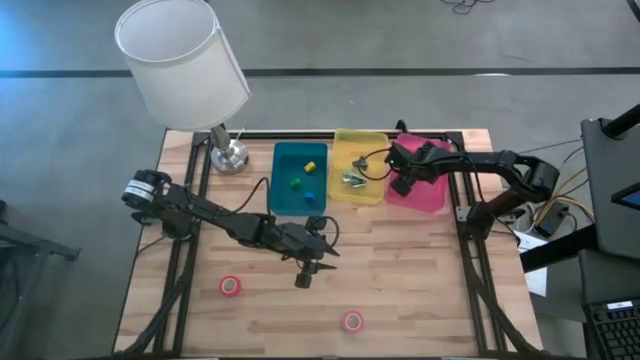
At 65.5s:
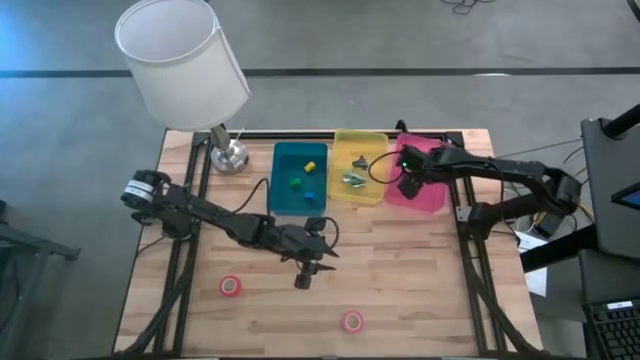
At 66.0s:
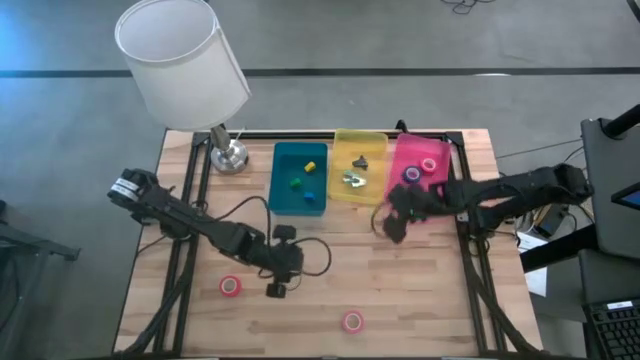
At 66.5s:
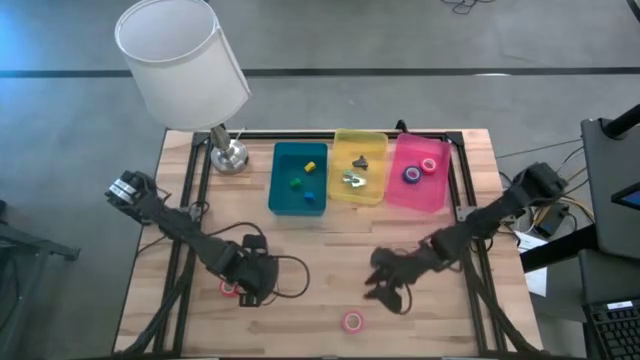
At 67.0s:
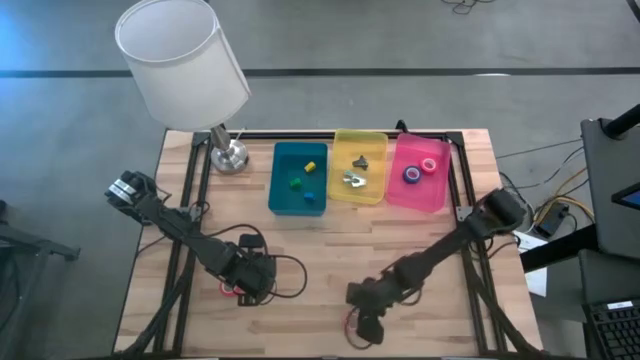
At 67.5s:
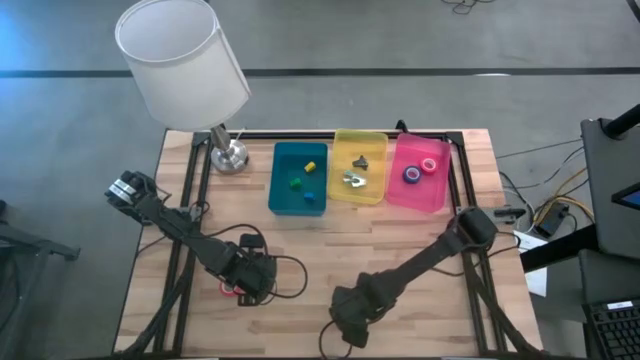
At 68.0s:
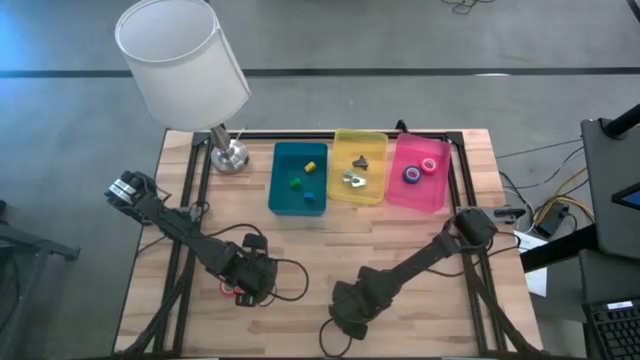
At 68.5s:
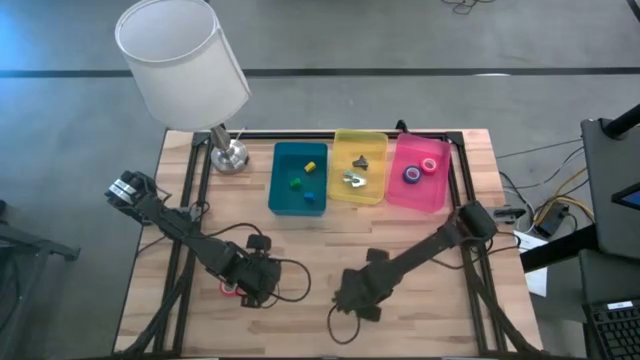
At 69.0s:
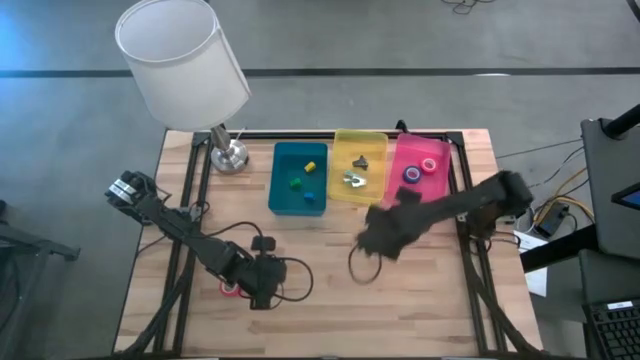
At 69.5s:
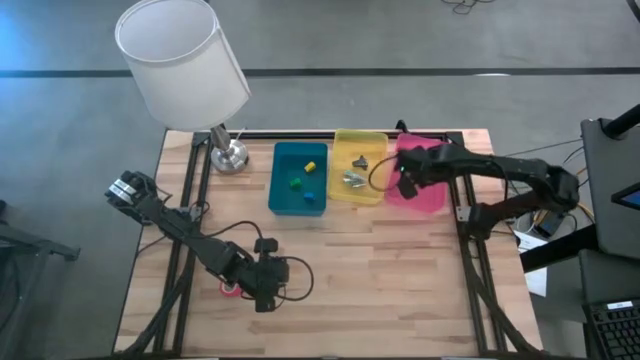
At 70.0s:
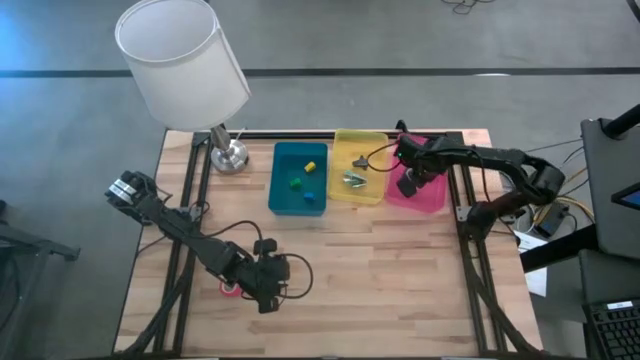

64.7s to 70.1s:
Task: Pick and place Stapler, Stapler remover, tape
Put the pink tape on the pink bin

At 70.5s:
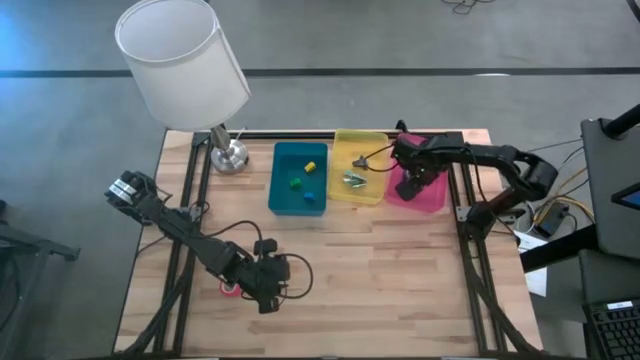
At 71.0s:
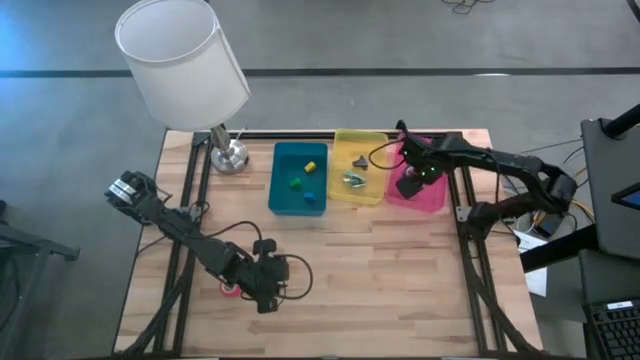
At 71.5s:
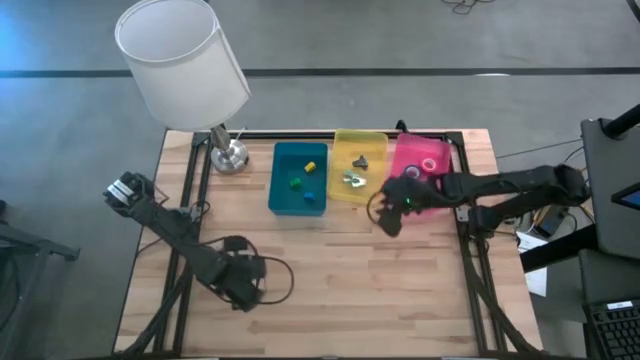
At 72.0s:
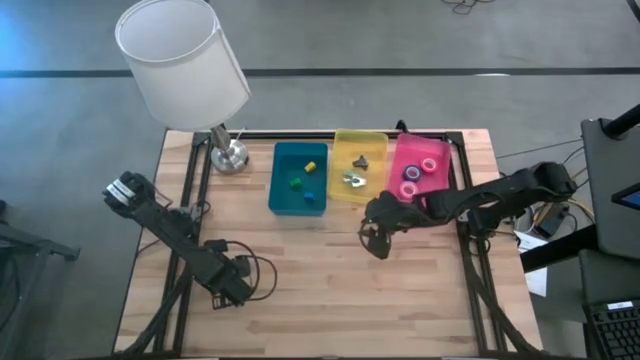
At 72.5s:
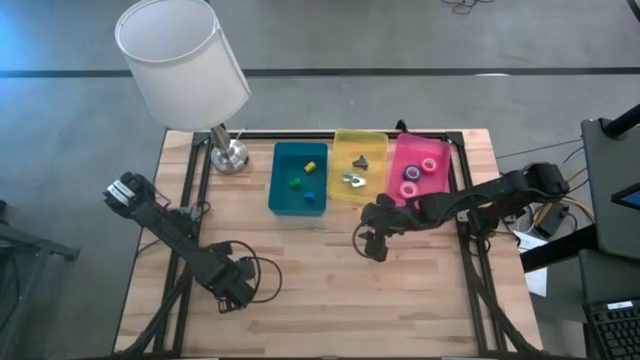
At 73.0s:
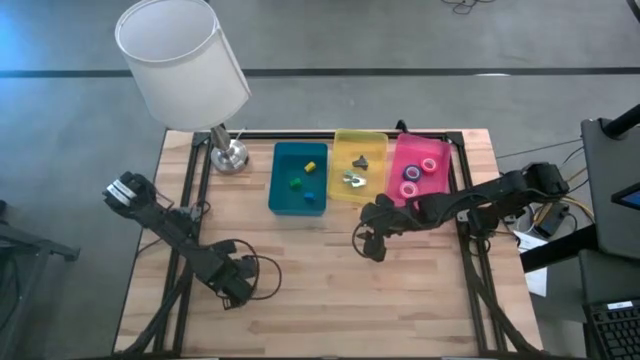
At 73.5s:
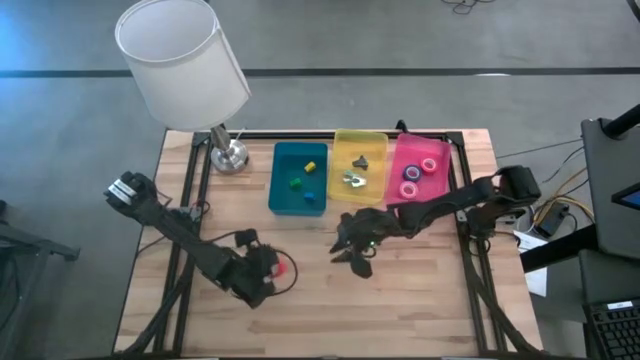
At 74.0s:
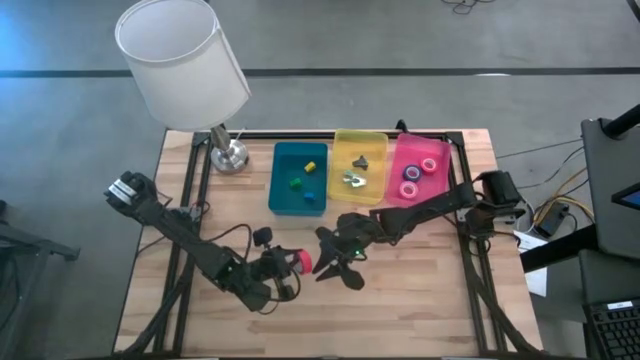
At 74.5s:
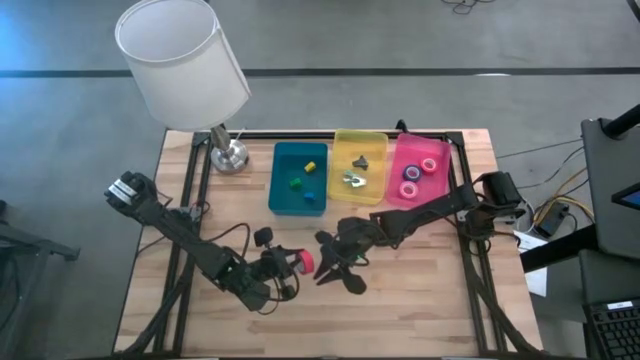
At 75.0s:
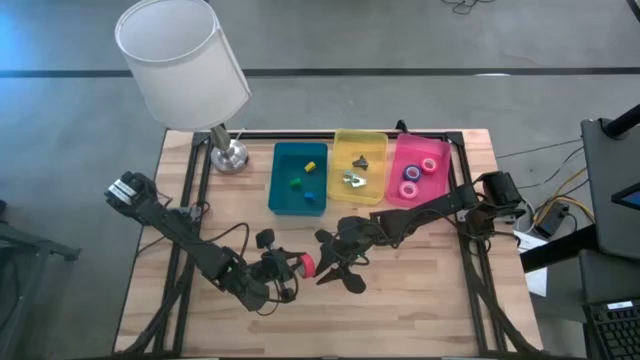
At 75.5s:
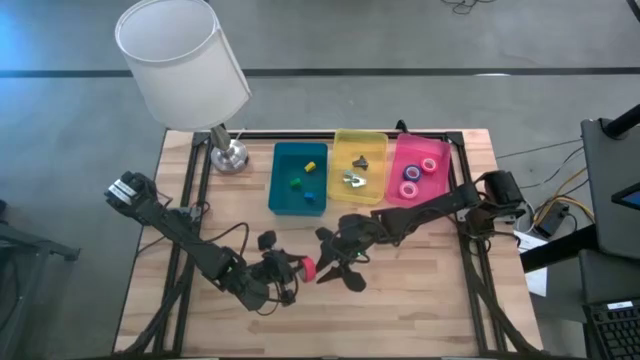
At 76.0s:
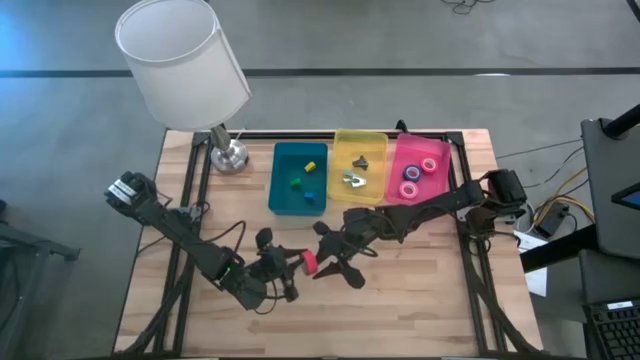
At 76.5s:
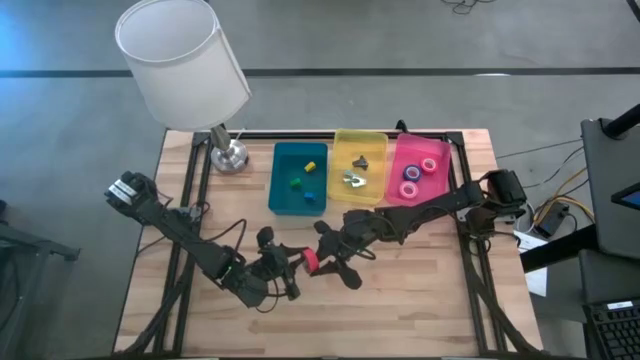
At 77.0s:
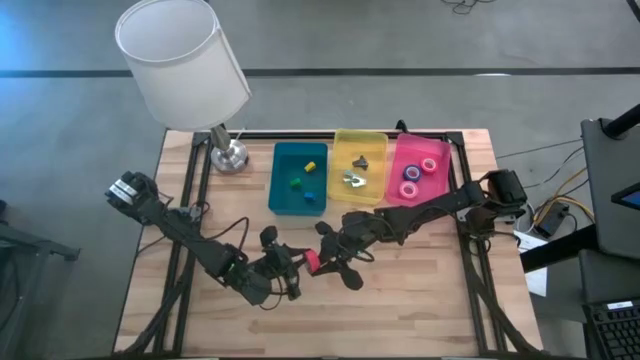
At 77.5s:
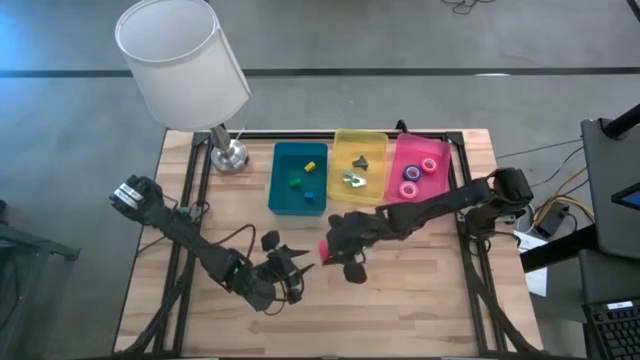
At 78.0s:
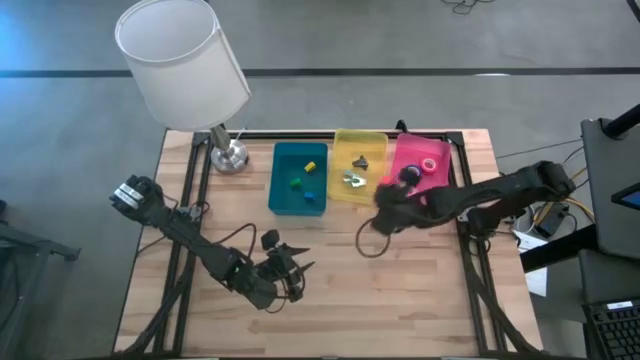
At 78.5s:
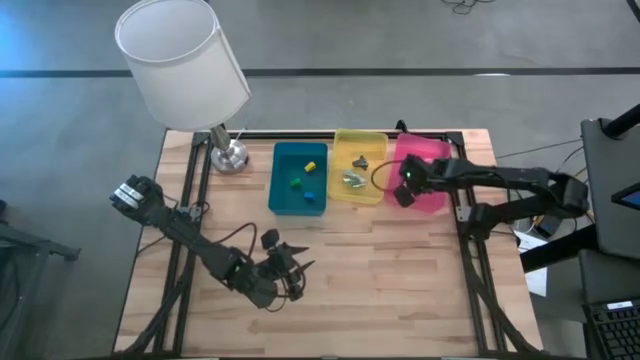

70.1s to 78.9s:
Put the orange tape on the pink bin

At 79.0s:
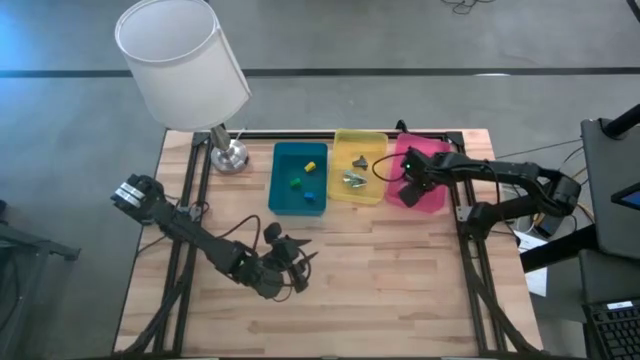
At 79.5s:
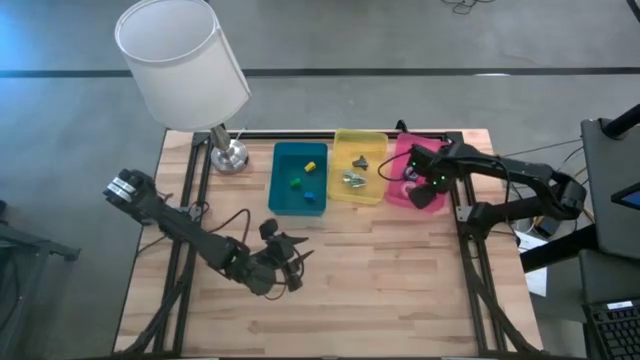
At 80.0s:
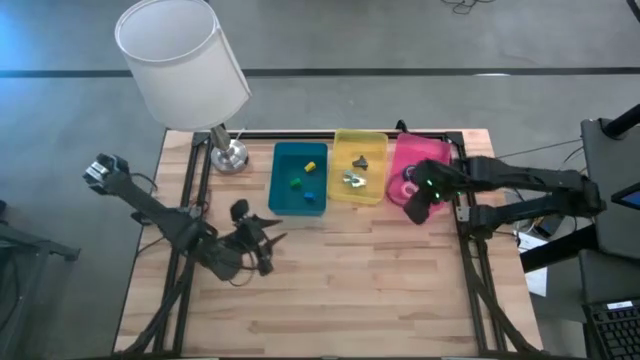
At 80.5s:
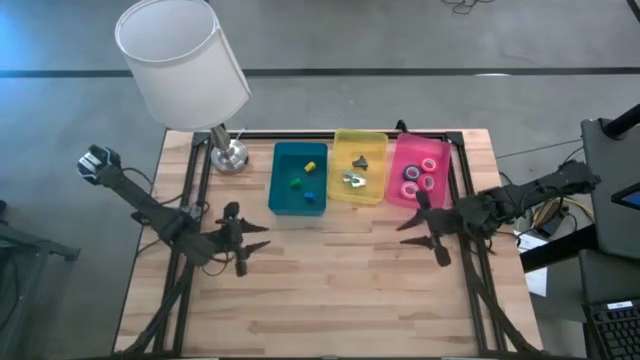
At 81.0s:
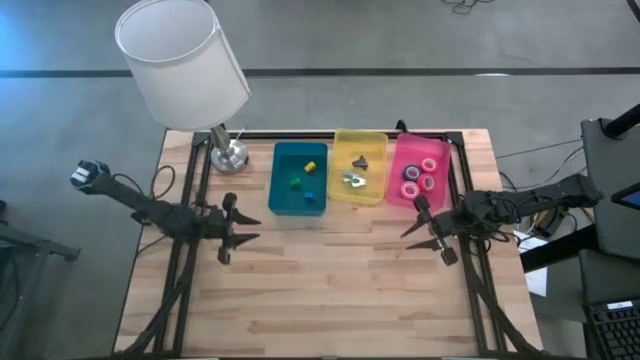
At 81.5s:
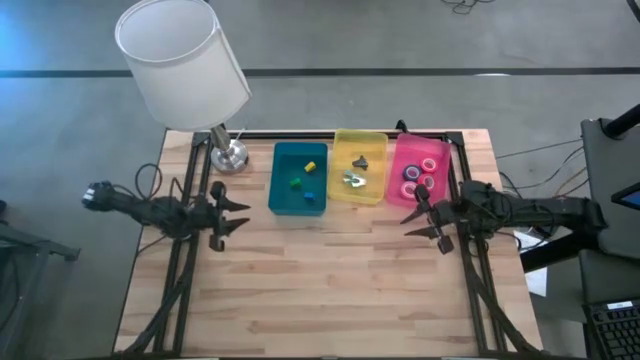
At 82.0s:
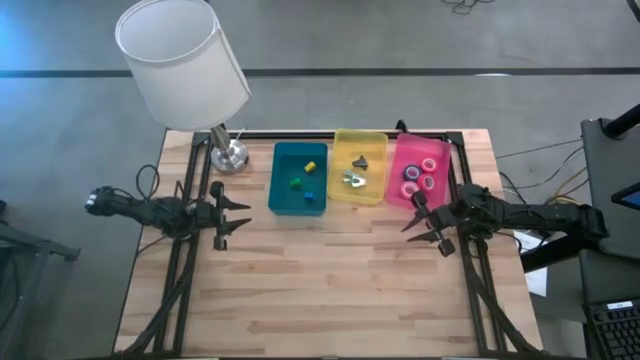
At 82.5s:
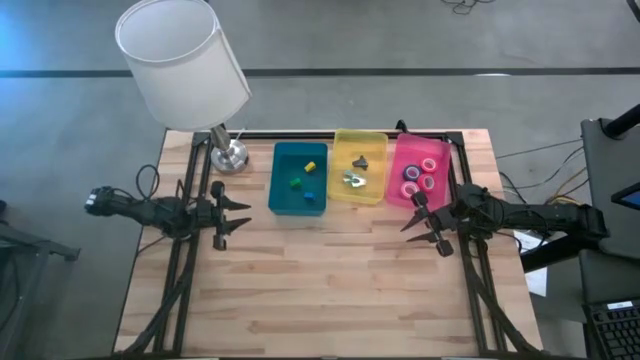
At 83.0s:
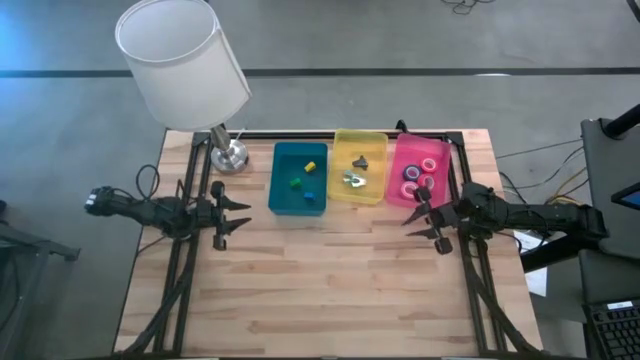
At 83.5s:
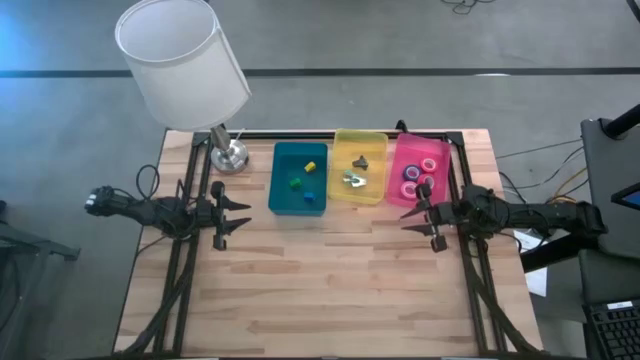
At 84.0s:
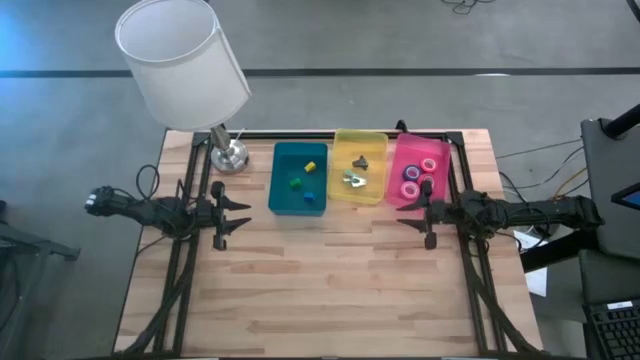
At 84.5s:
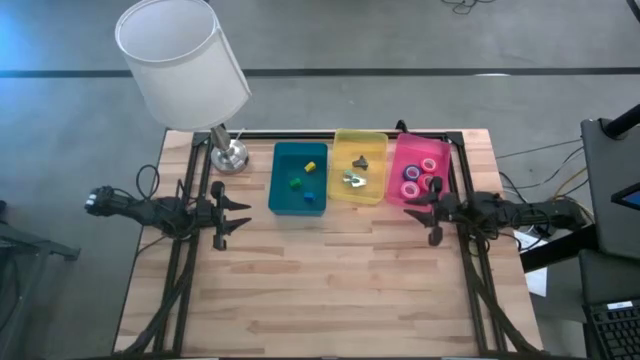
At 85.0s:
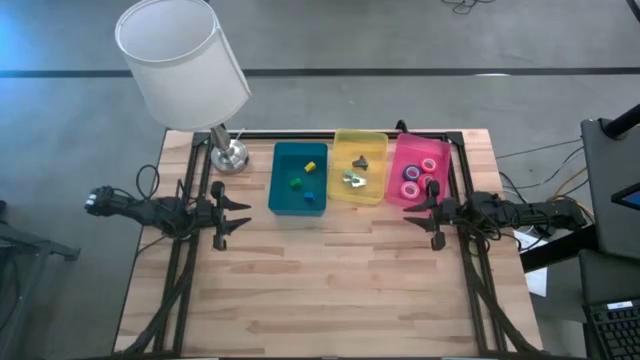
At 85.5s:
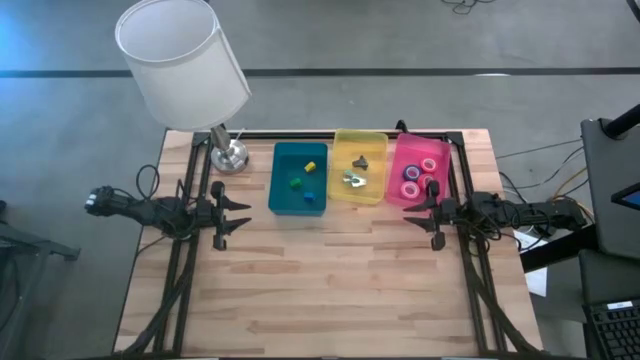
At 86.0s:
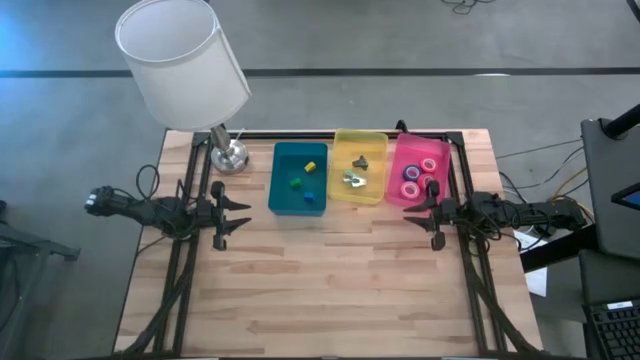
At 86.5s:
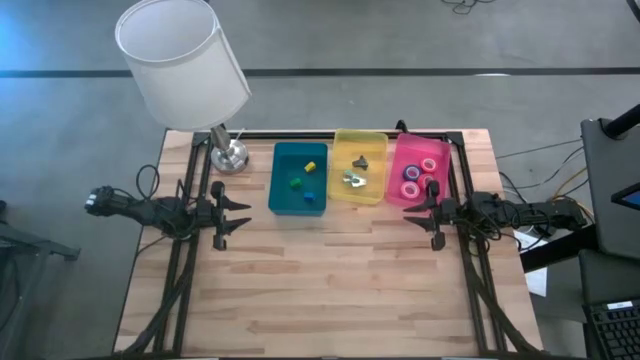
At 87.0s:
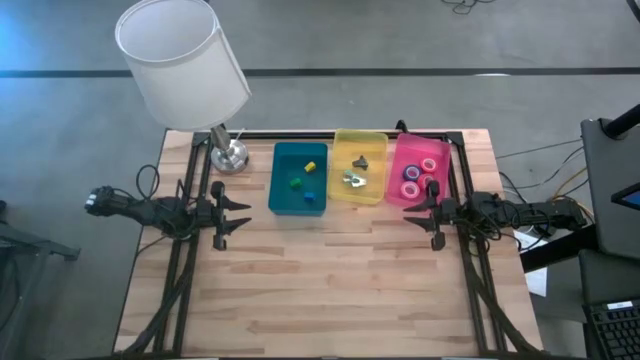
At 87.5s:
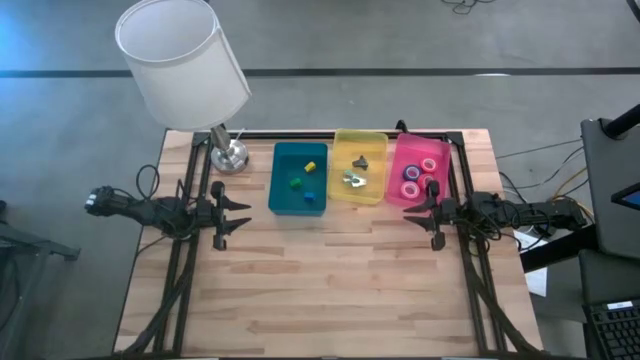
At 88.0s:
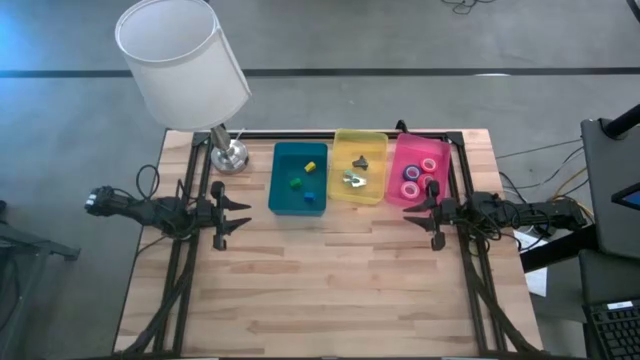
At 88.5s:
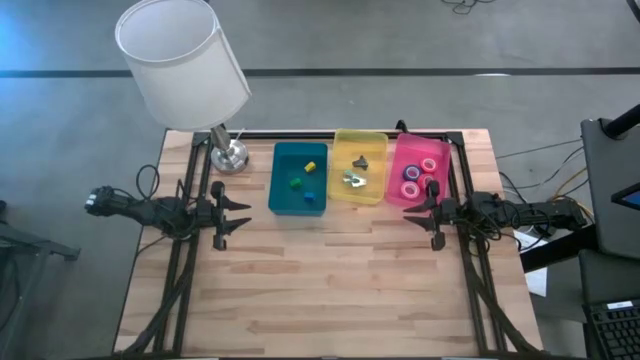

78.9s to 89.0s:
Return to Home Position
